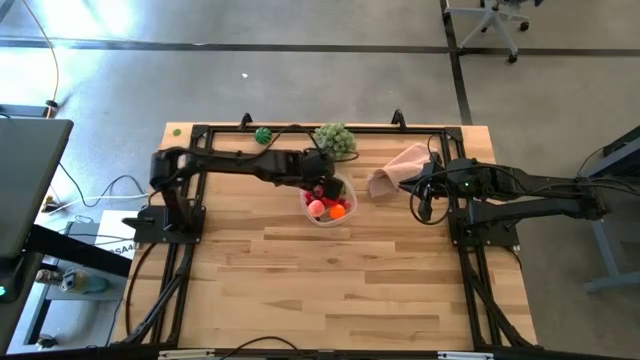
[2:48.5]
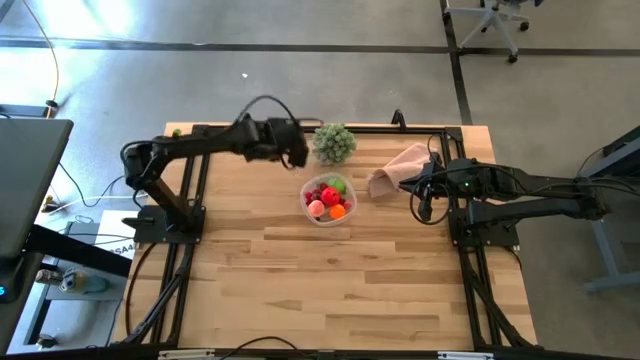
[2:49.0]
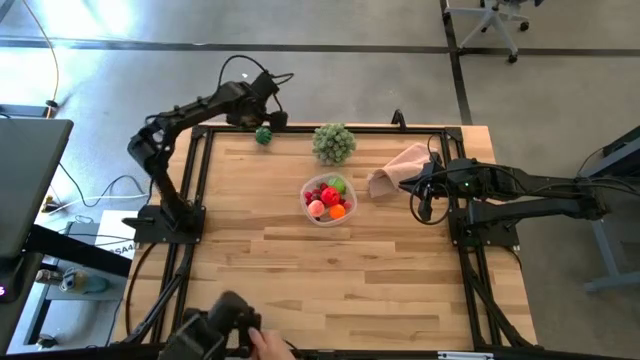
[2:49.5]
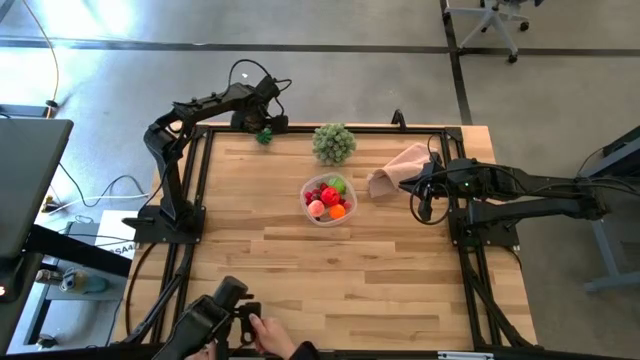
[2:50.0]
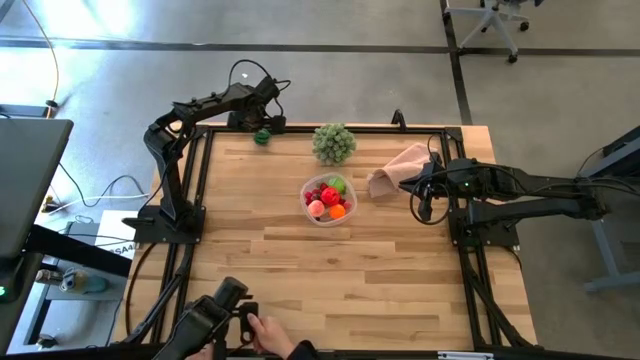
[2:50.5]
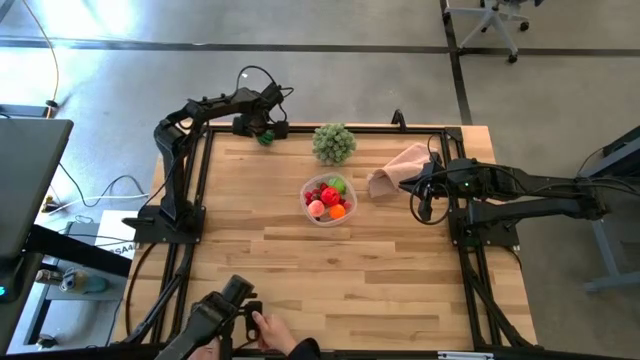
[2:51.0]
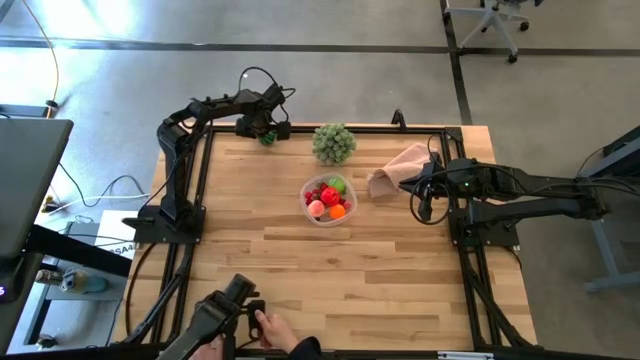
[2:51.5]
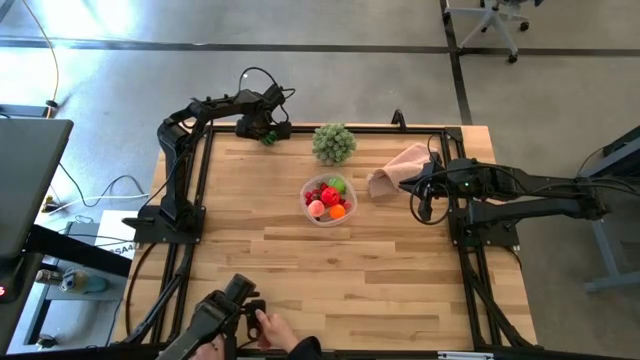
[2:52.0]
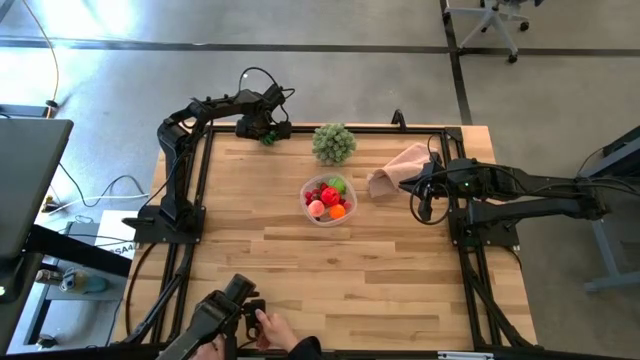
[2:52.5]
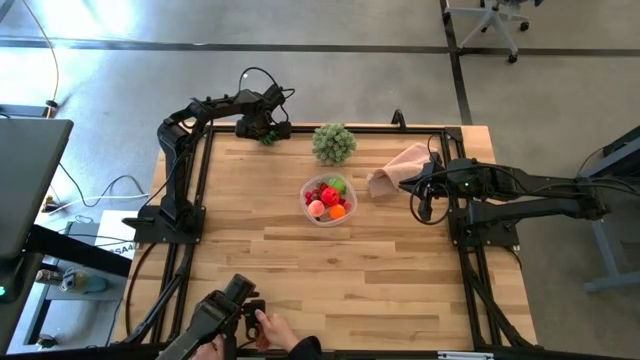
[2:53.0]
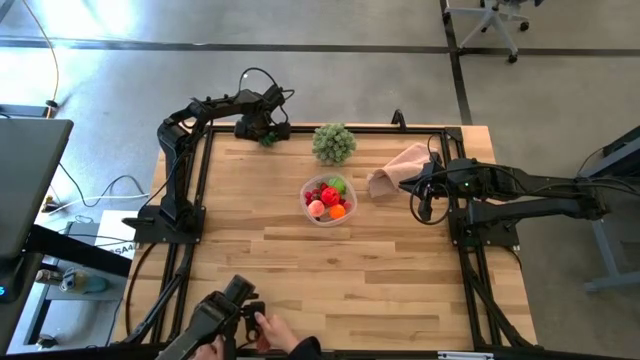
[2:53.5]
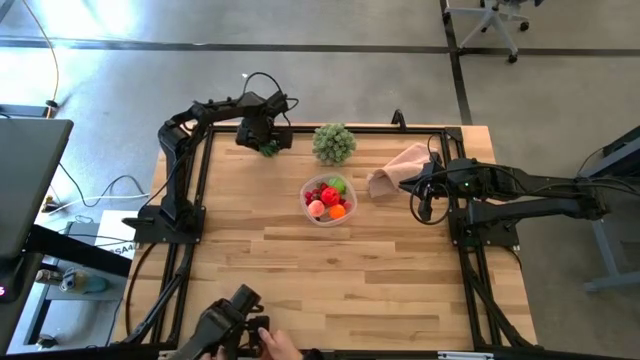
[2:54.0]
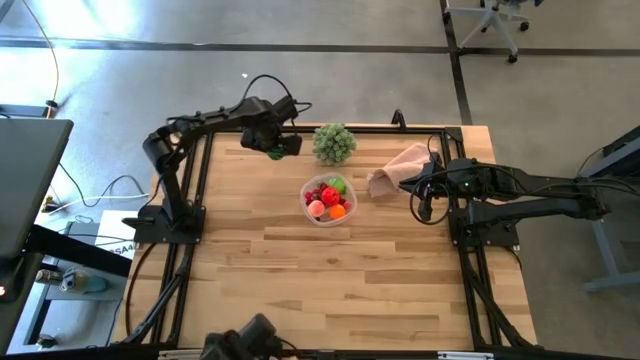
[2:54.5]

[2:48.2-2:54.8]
Task: Pick and placing Produce into tupperware
Put the watermelon into the container

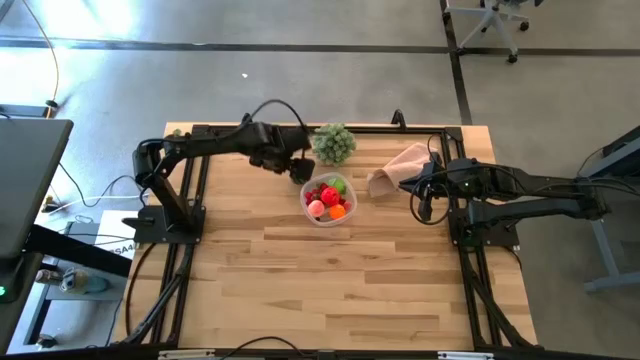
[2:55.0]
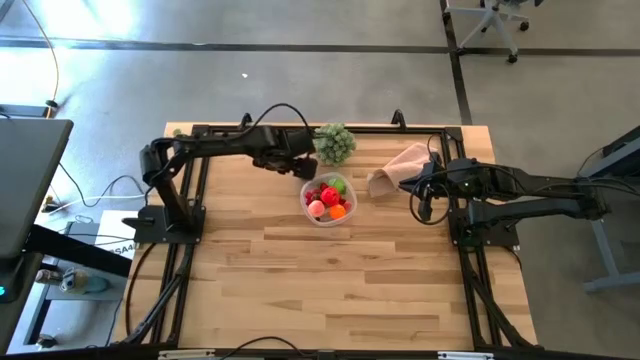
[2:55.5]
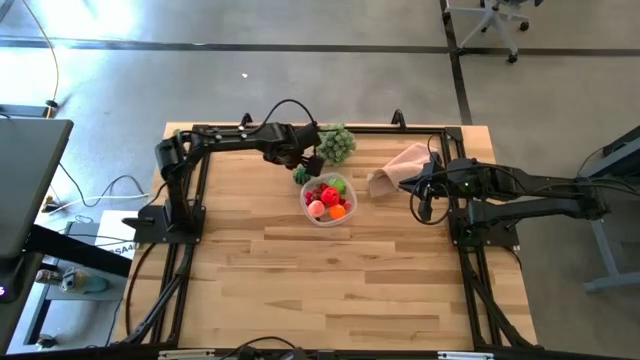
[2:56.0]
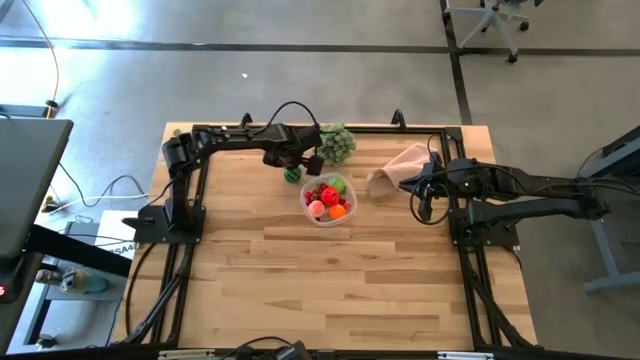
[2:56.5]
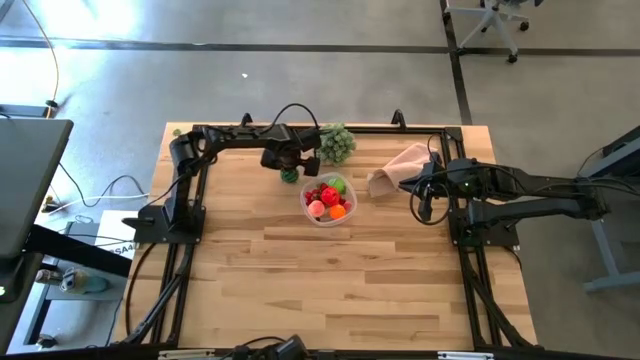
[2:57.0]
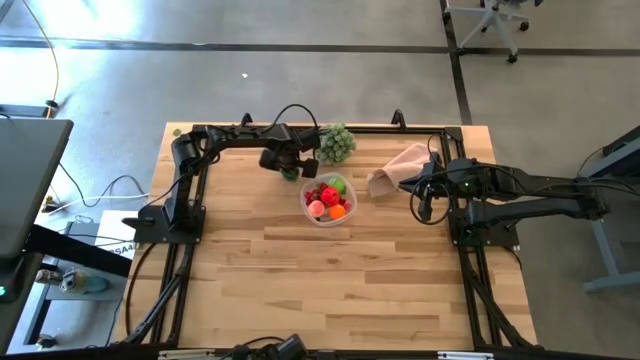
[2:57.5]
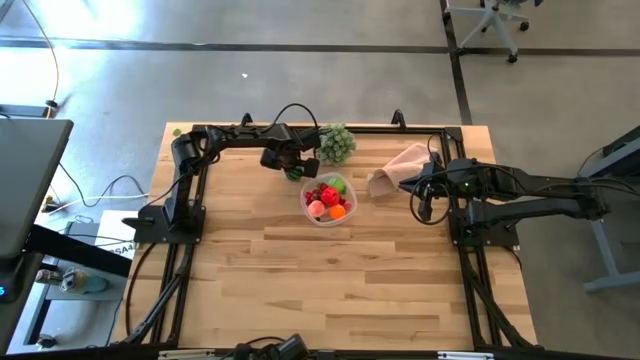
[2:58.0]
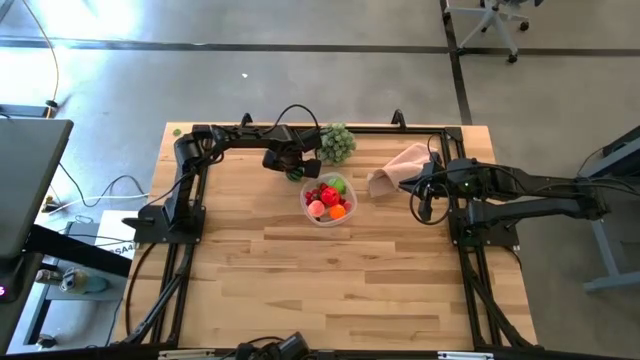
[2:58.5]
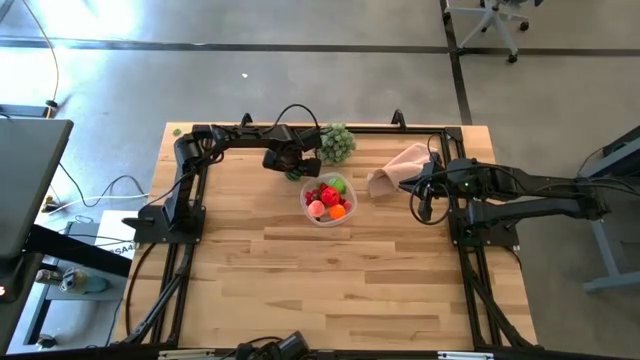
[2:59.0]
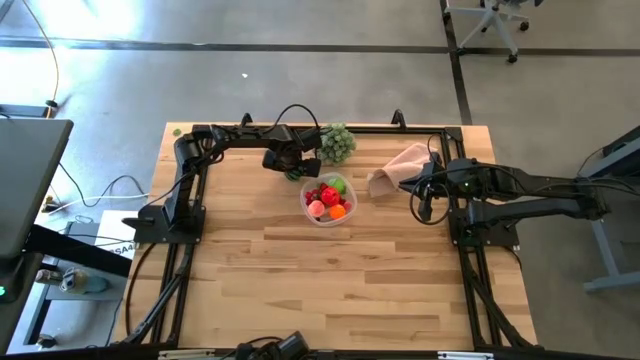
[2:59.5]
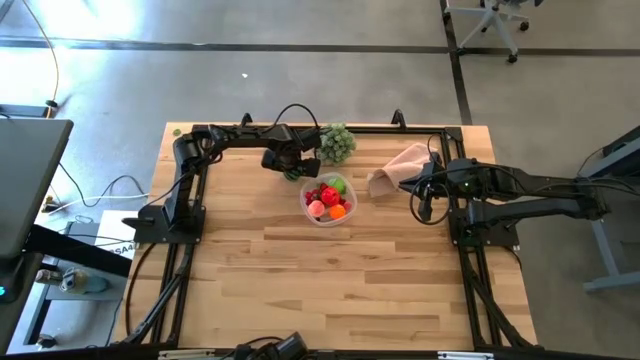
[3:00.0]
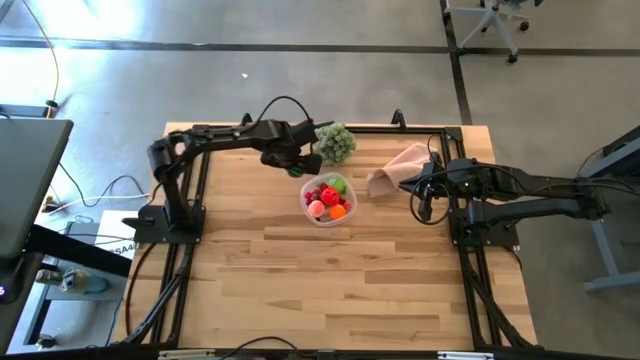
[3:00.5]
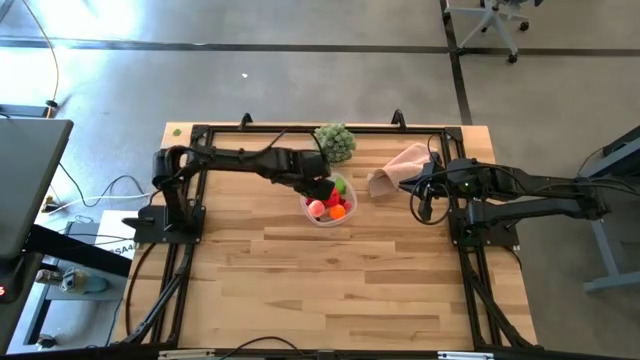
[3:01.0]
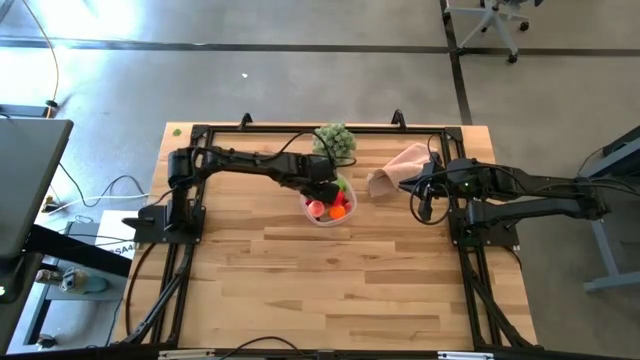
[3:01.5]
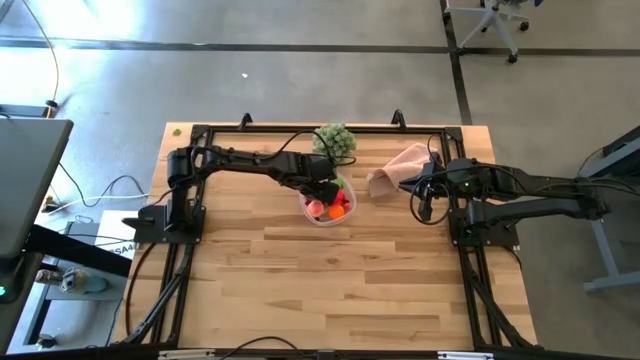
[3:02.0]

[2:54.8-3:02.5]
Put the watermelon into the container

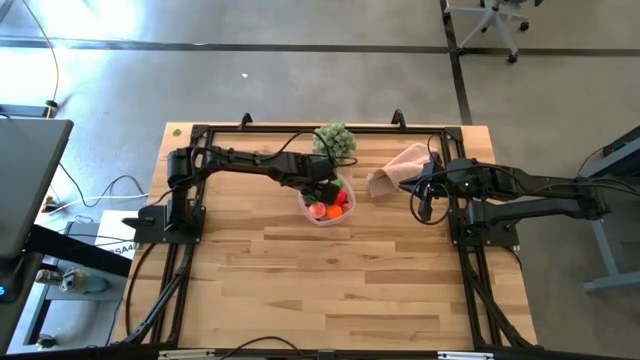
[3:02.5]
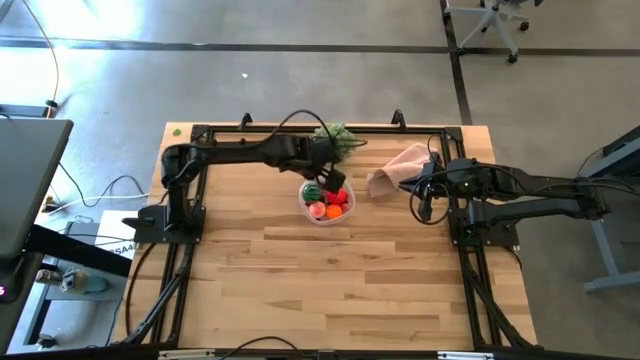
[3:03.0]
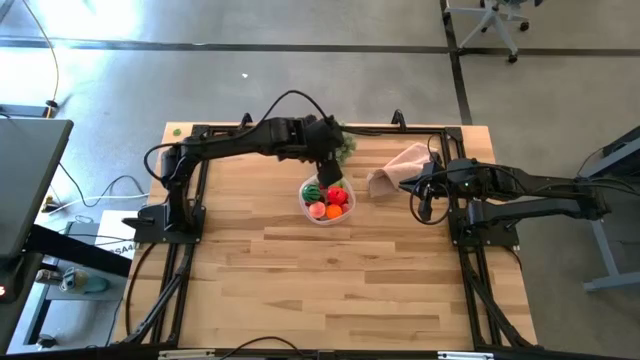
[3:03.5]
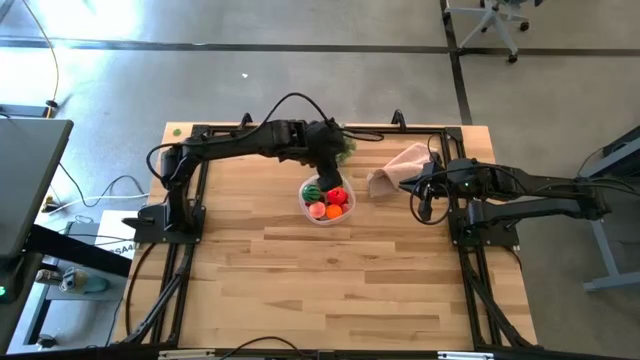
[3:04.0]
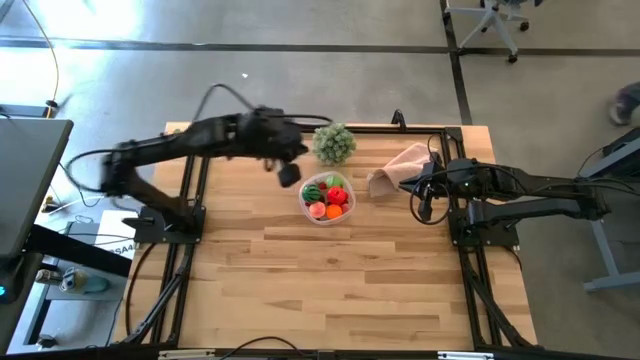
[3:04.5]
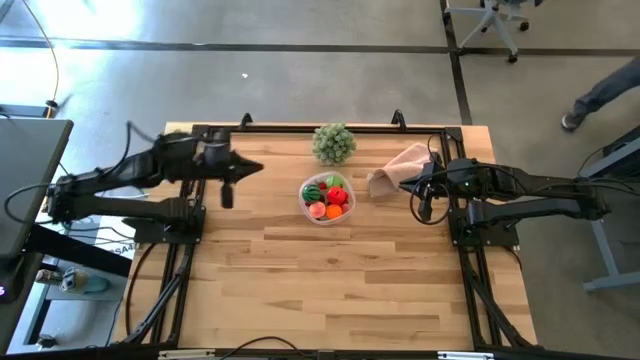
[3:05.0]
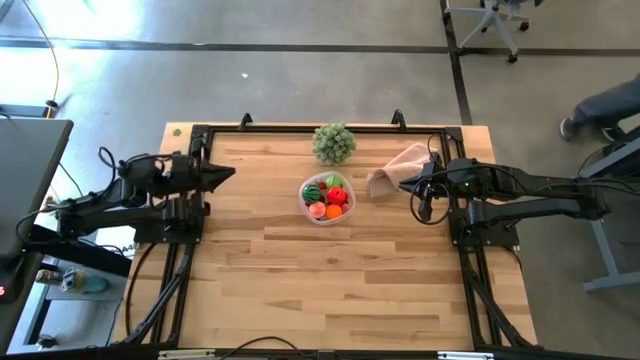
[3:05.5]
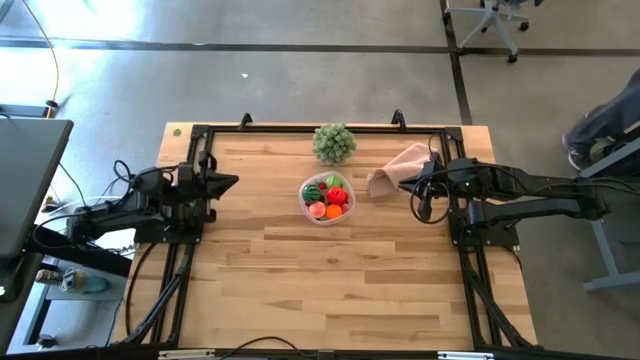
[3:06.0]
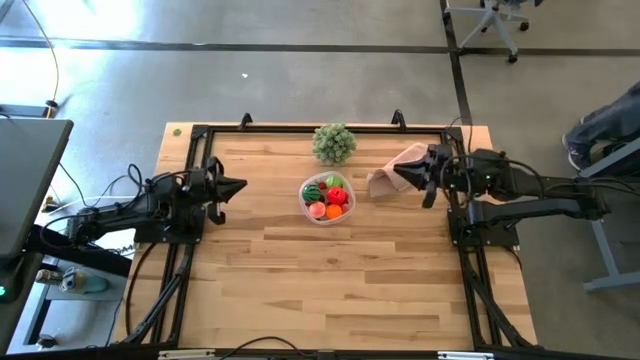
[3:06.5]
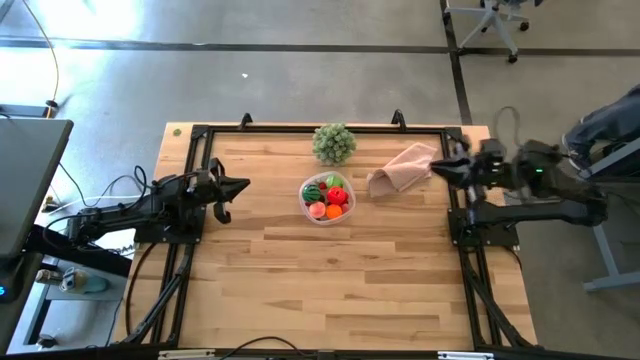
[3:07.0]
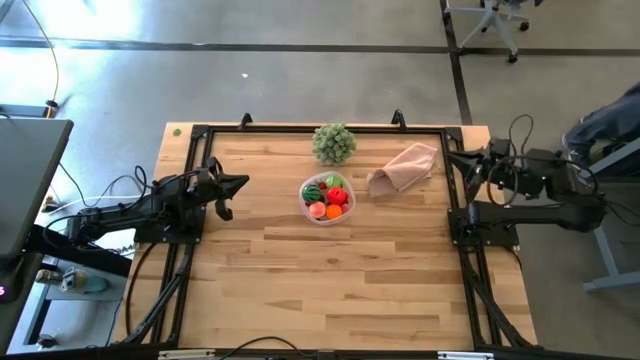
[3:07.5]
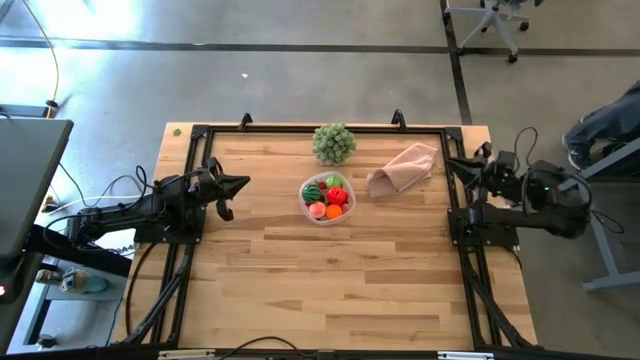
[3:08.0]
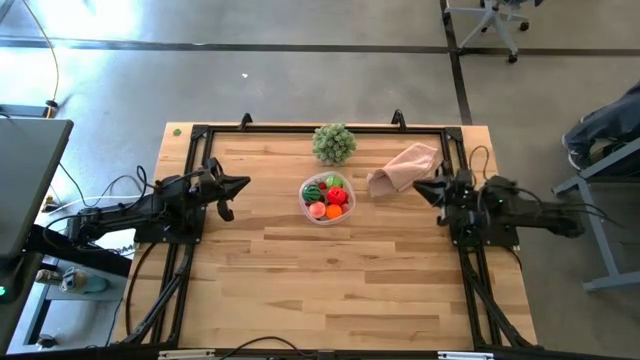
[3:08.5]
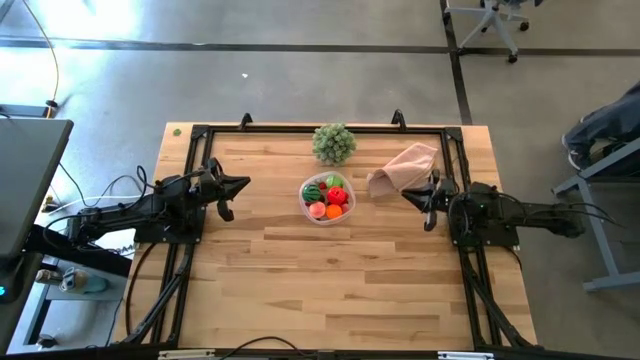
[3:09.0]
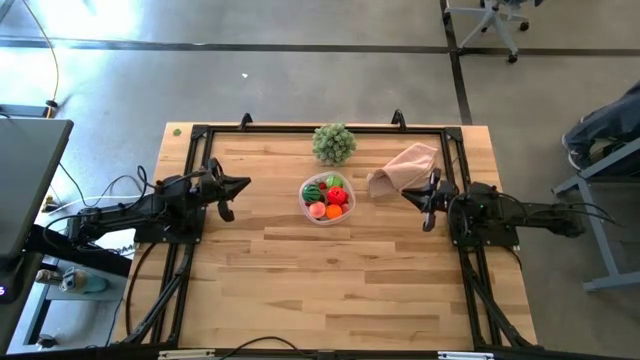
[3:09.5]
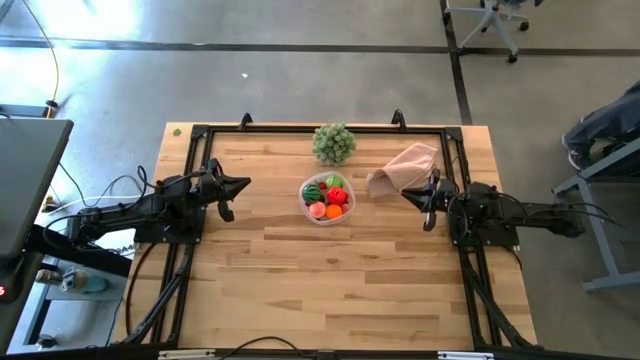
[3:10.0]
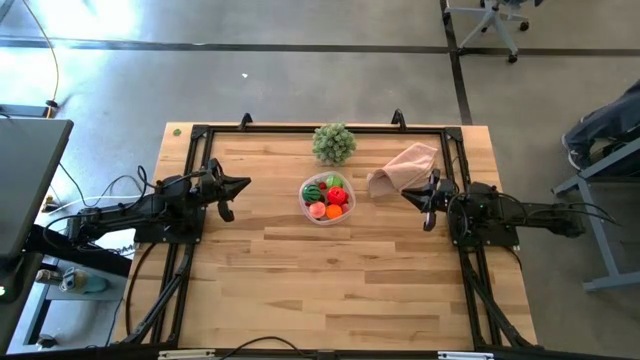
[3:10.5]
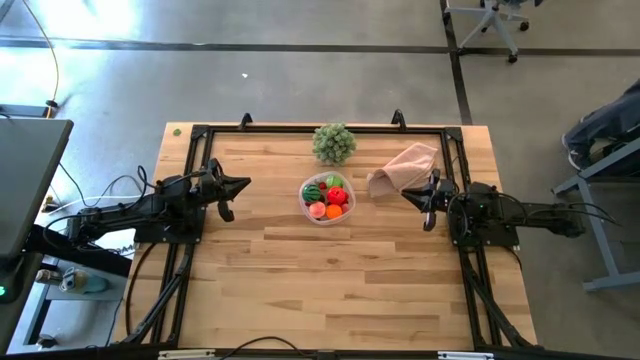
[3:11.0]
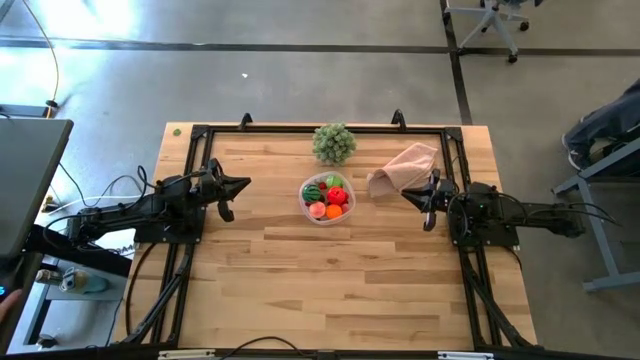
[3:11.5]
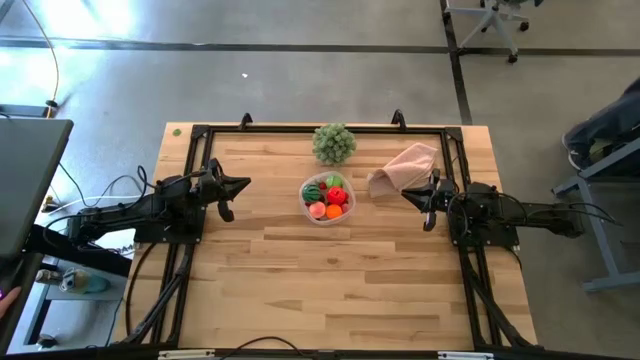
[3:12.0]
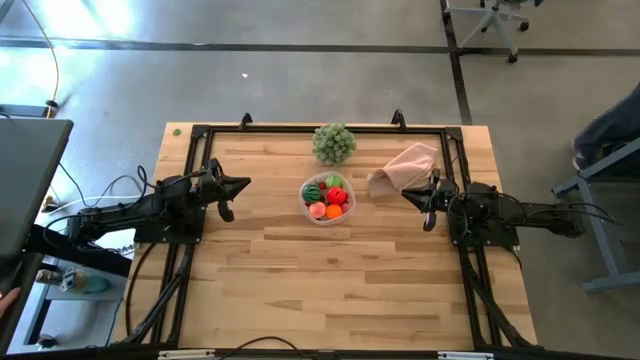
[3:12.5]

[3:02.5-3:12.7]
Return to Home Position
